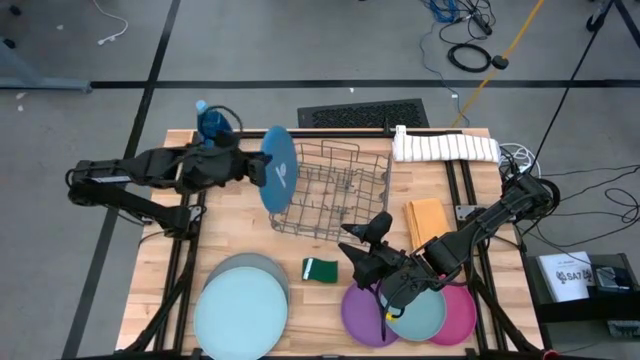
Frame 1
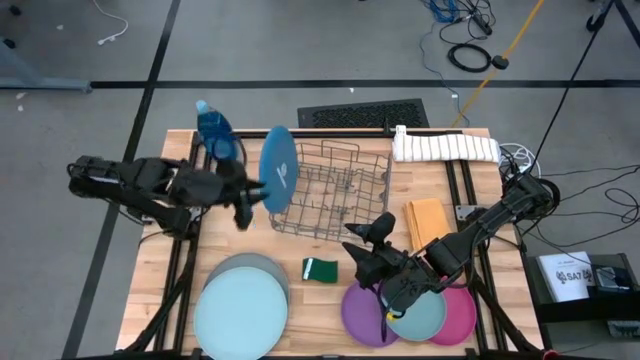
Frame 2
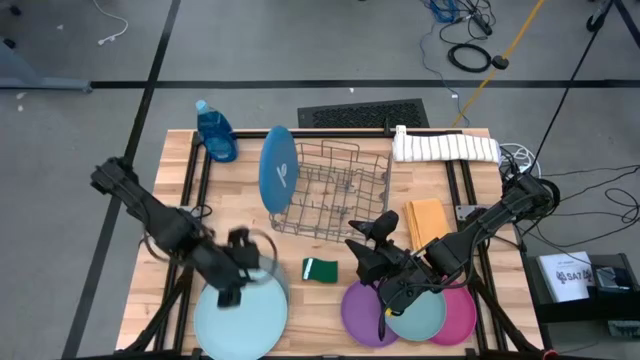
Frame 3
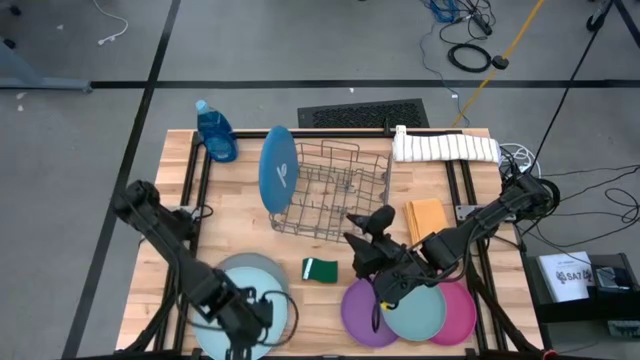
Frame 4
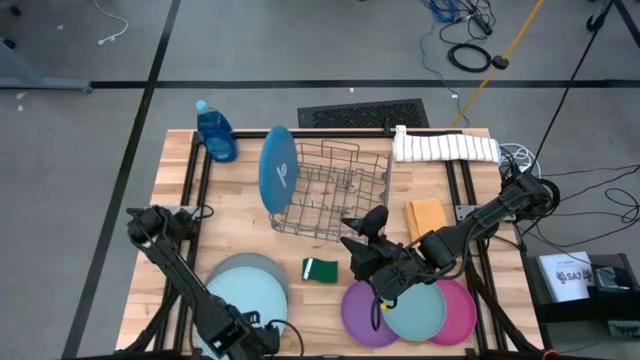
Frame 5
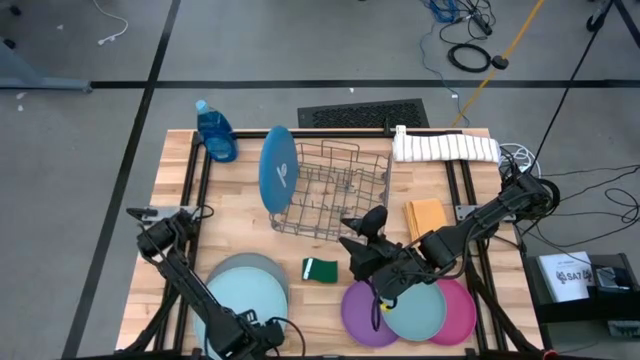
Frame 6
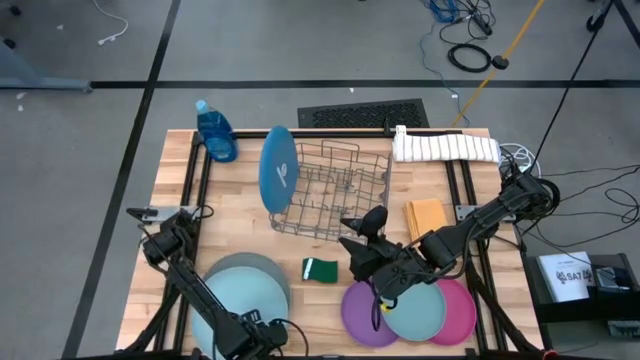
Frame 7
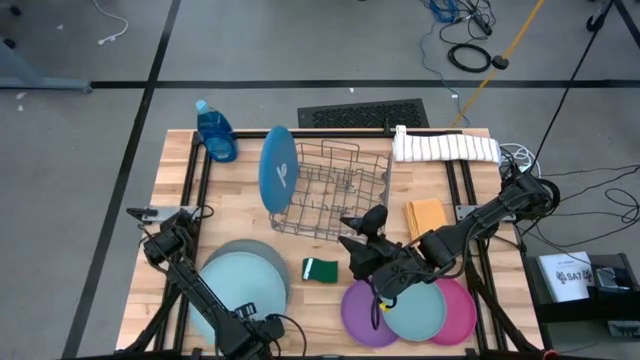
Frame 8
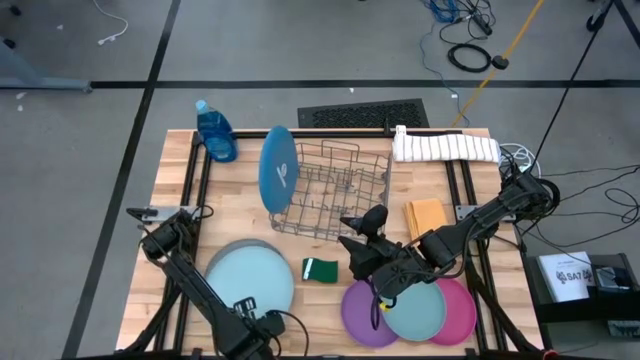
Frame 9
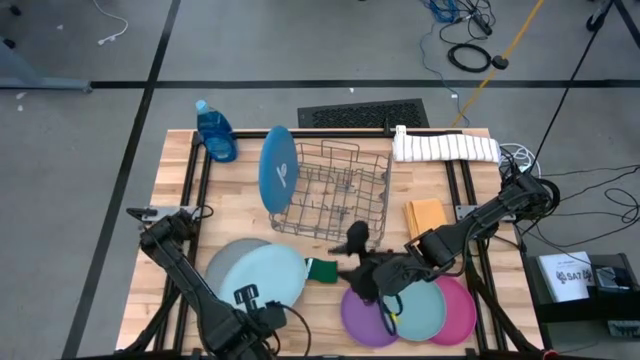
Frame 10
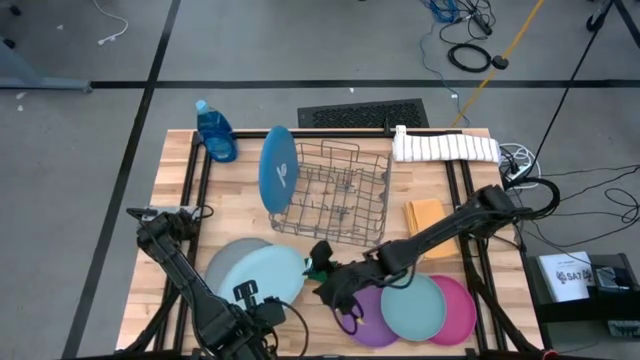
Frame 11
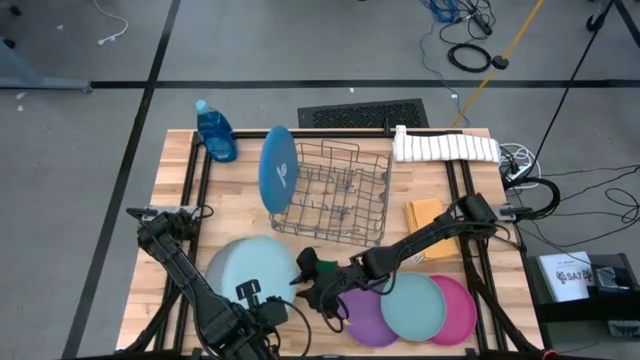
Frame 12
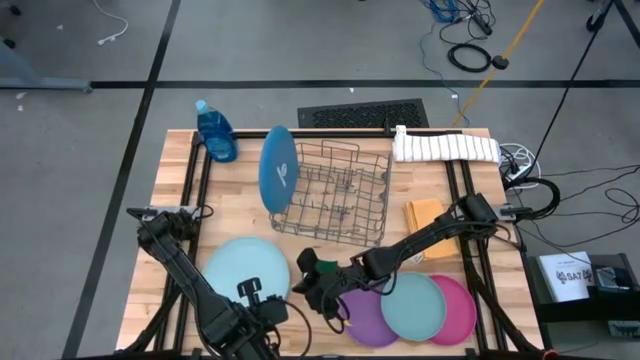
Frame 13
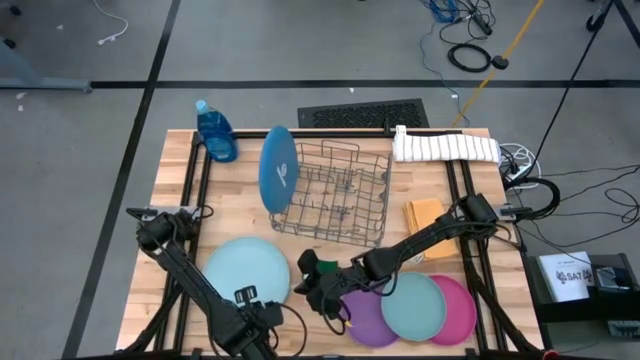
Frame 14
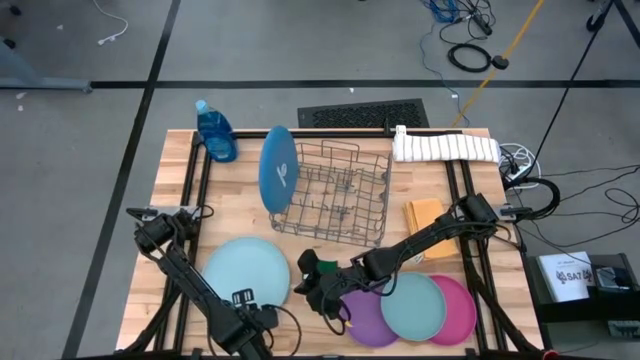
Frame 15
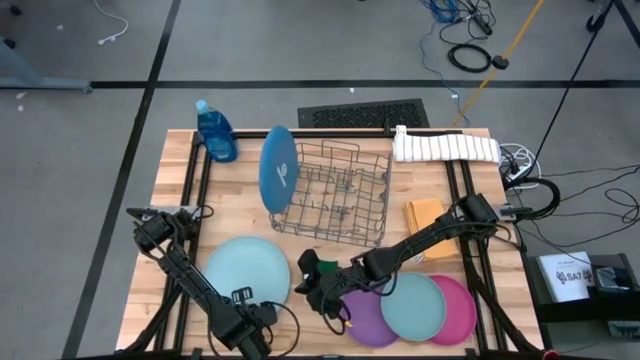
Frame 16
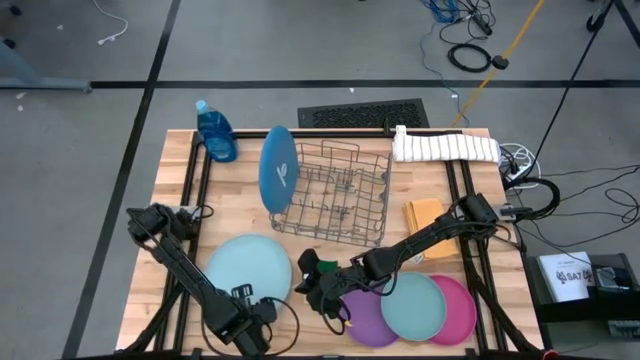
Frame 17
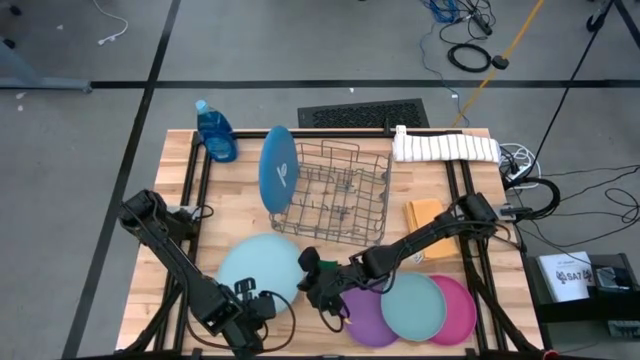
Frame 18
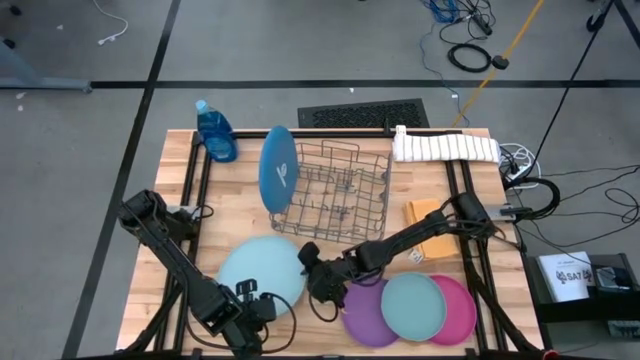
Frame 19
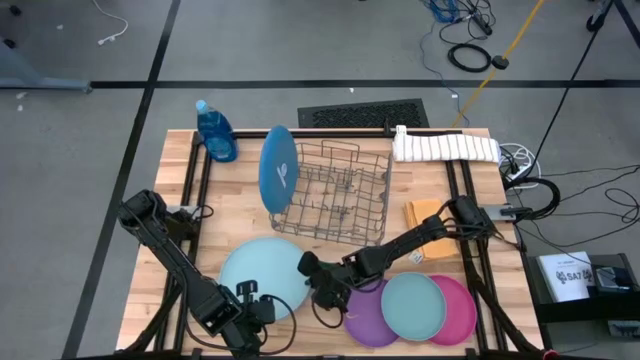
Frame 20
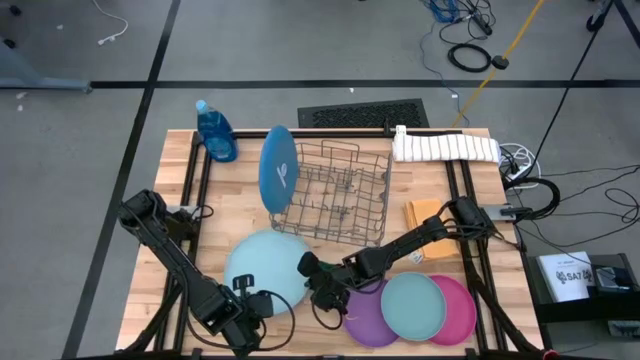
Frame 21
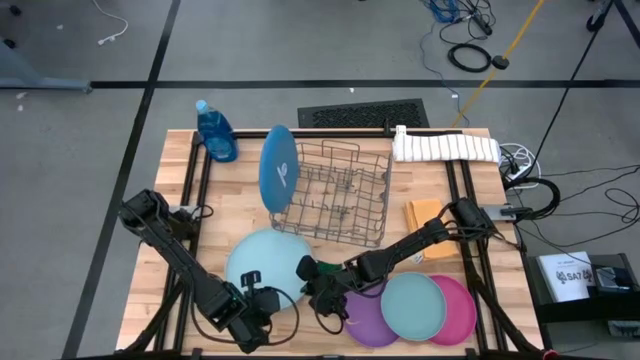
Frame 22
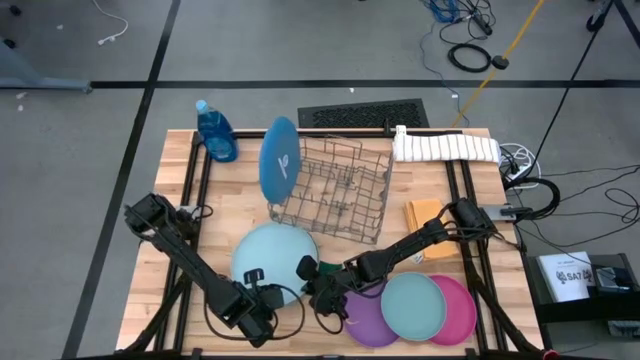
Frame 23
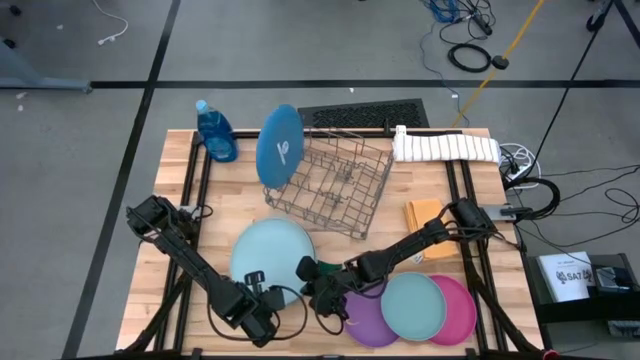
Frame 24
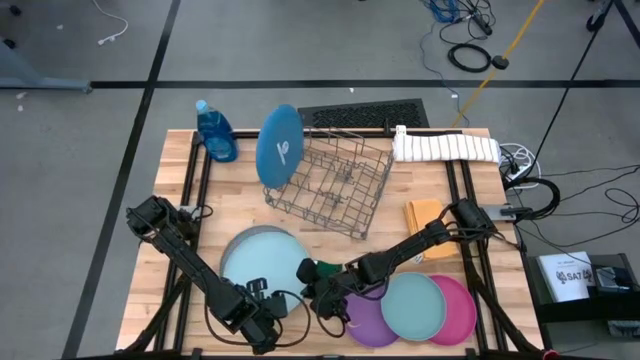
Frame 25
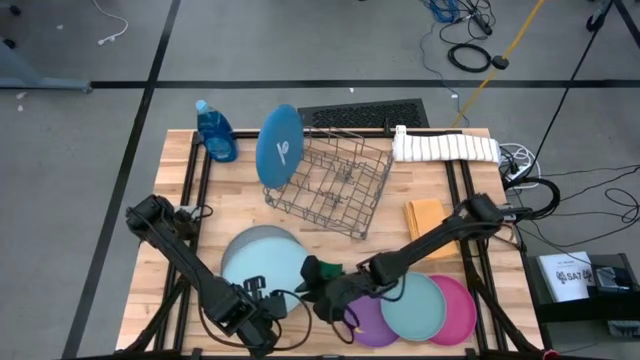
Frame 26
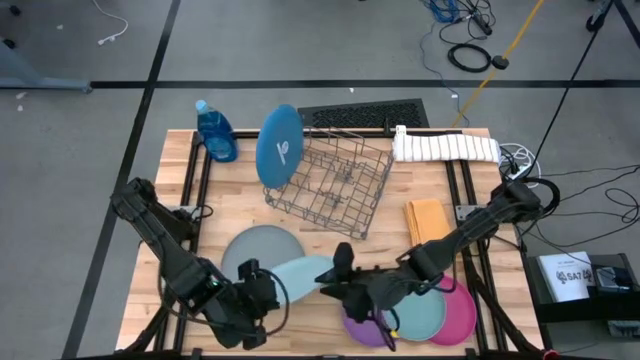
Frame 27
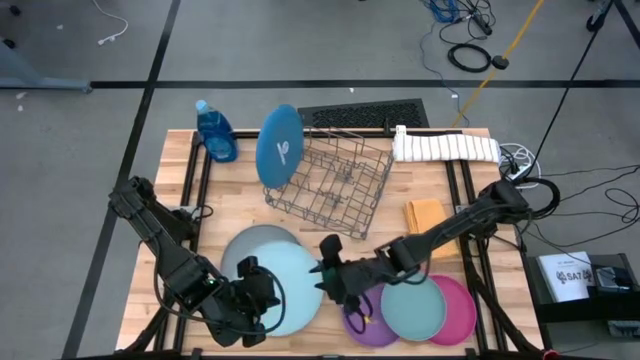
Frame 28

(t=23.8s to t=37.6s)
Task: Sort dishes
Put the large light blue plate in the dish rack

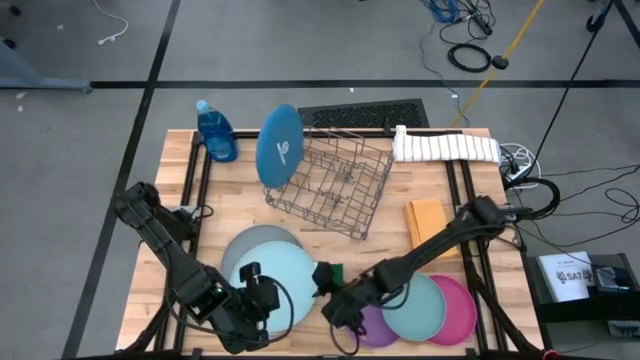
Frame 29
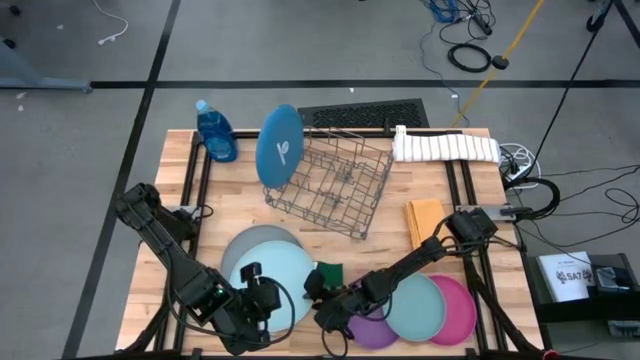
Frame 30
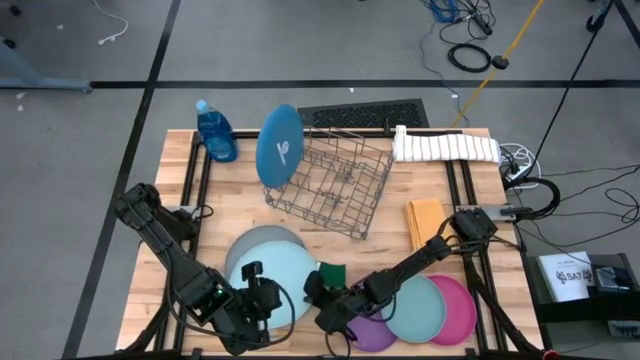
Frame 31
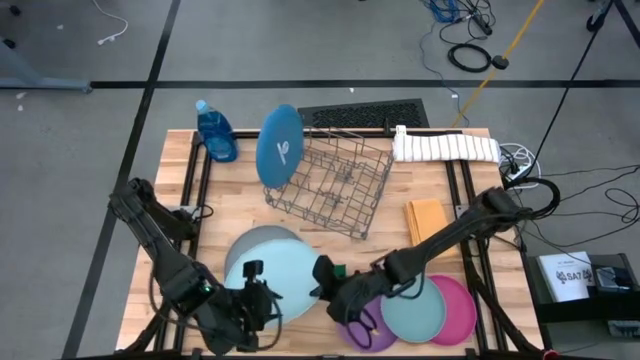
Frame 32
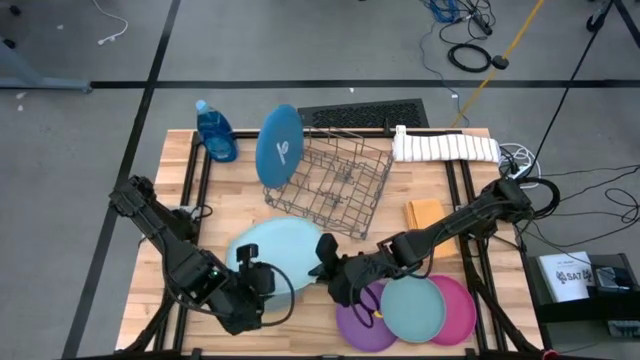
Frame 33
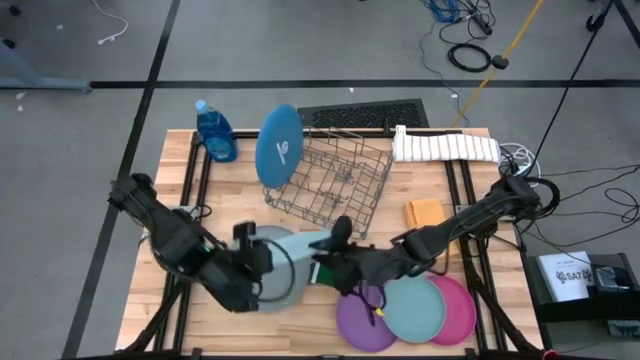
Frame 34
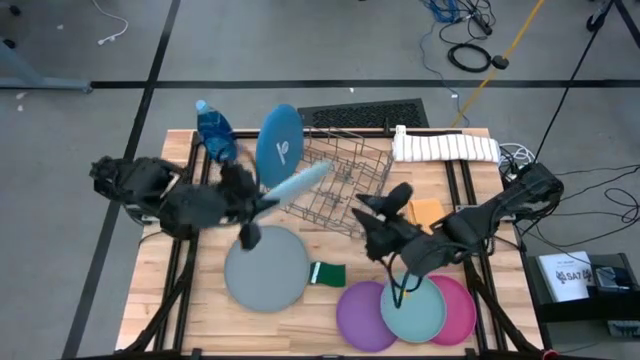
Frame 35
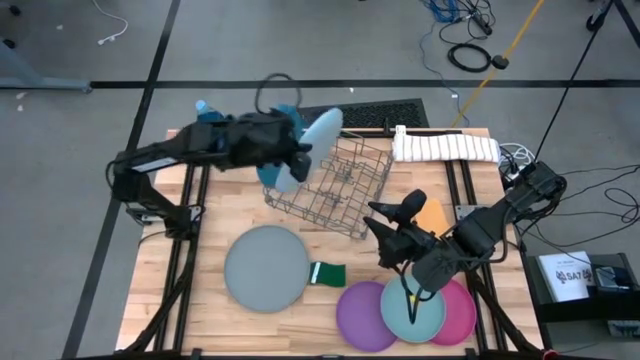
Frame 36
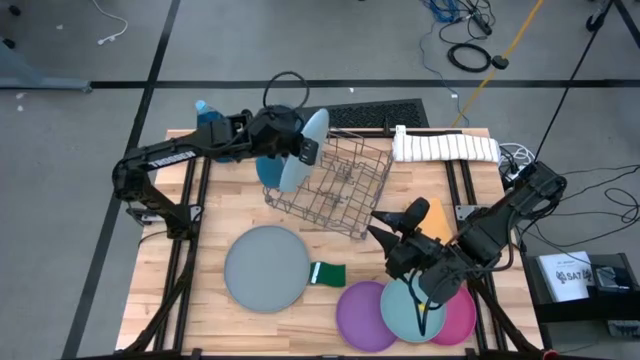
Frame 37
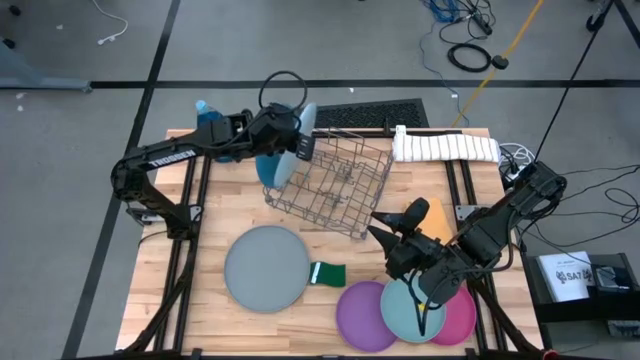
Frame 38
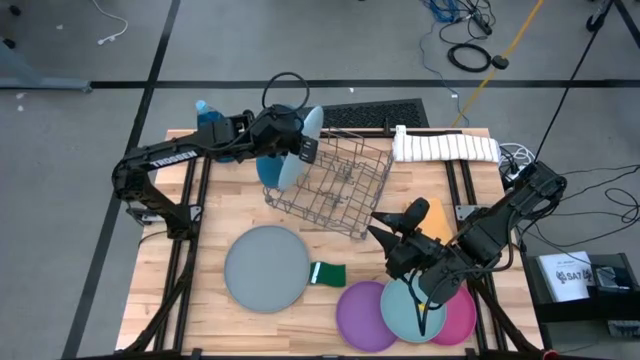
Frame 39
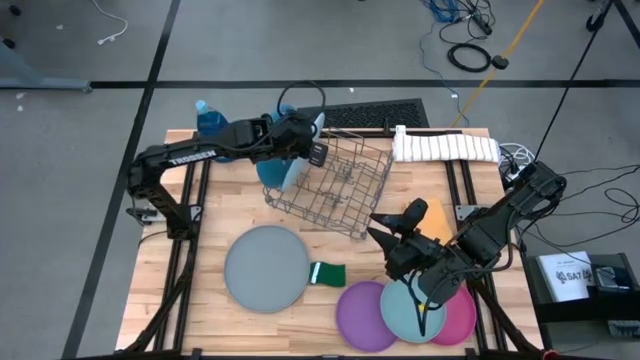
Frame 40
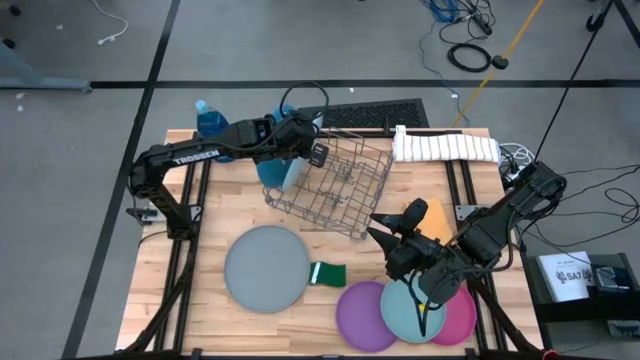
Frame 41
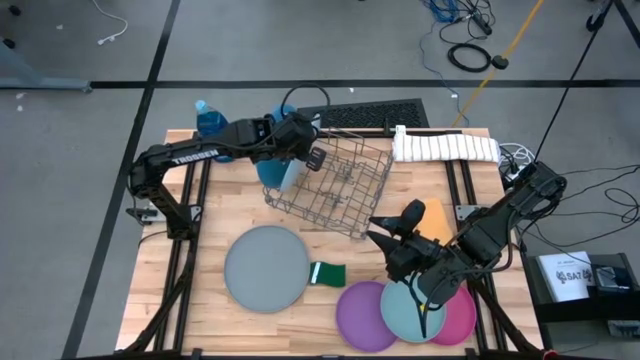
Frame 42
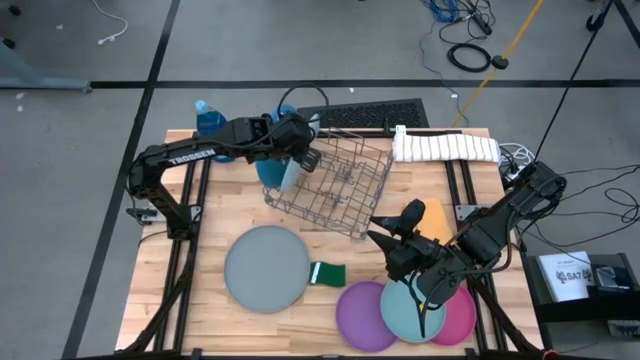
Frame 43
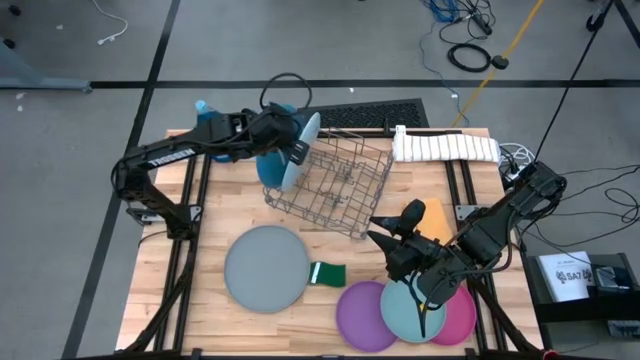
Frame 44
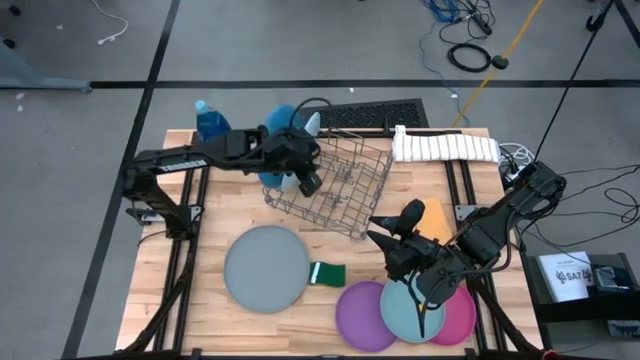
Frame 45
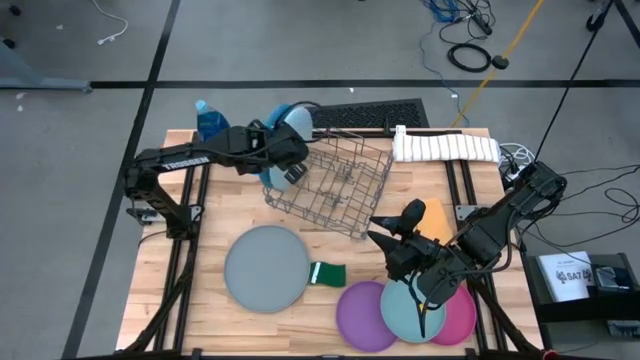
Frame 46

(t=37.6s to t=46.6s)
Put the large light blue plate in the dish rack
